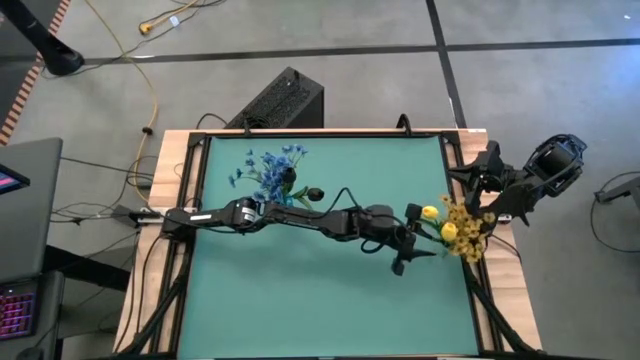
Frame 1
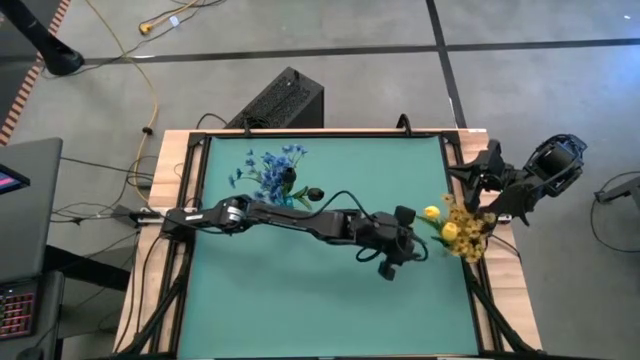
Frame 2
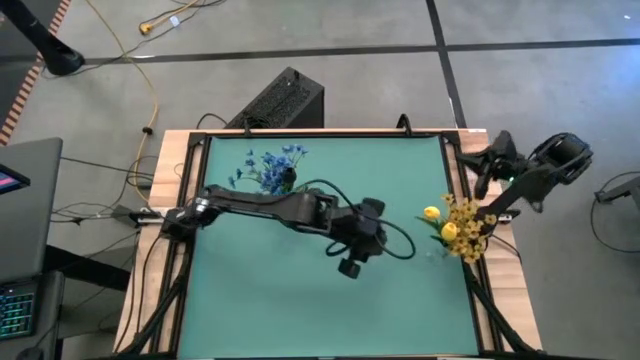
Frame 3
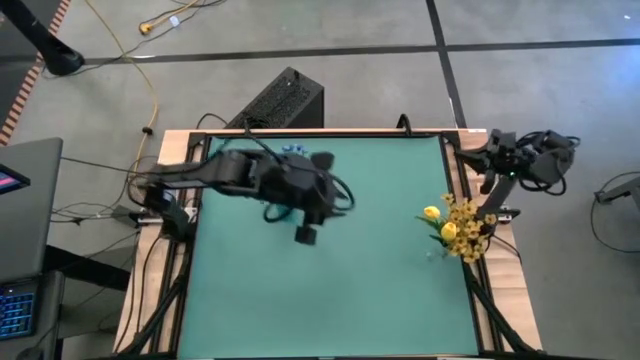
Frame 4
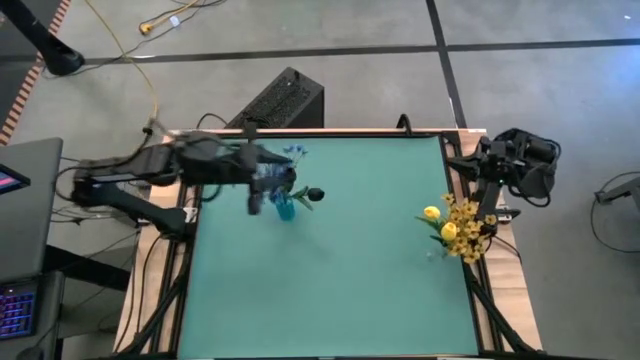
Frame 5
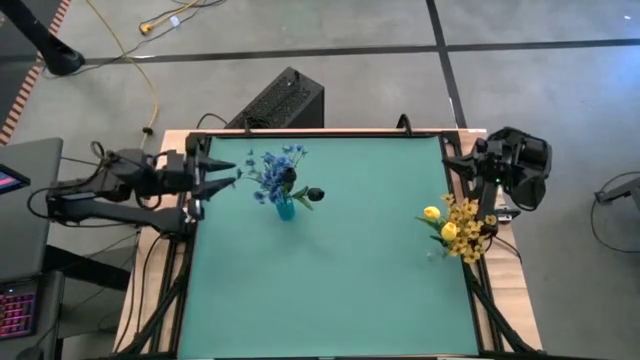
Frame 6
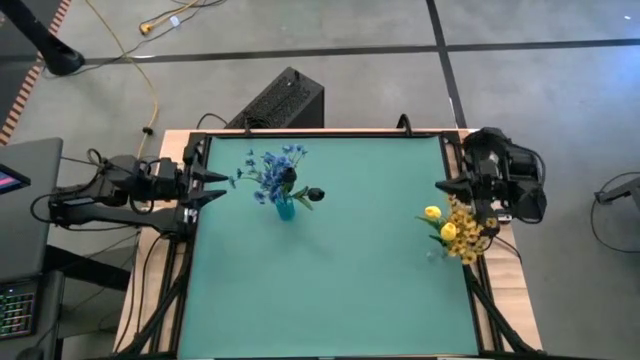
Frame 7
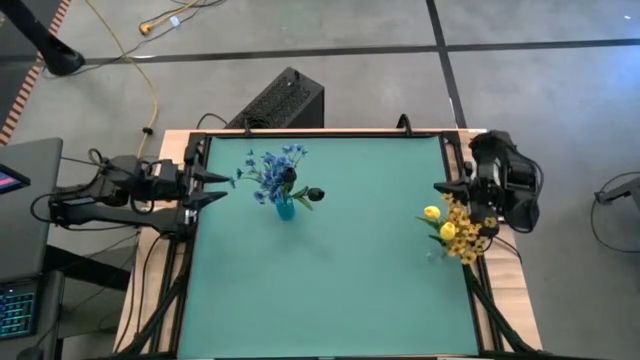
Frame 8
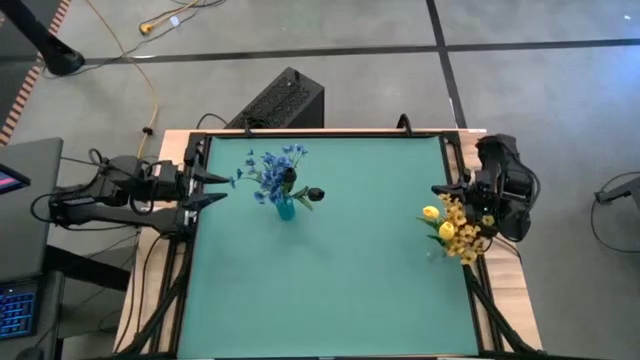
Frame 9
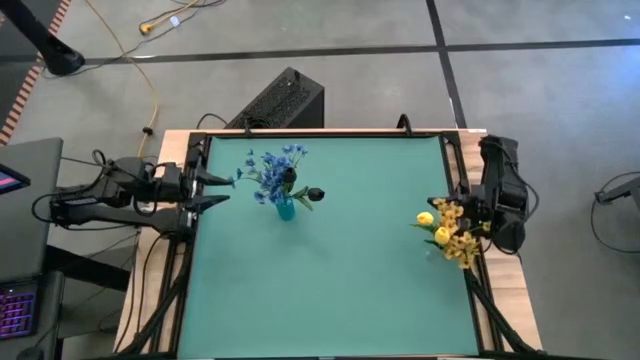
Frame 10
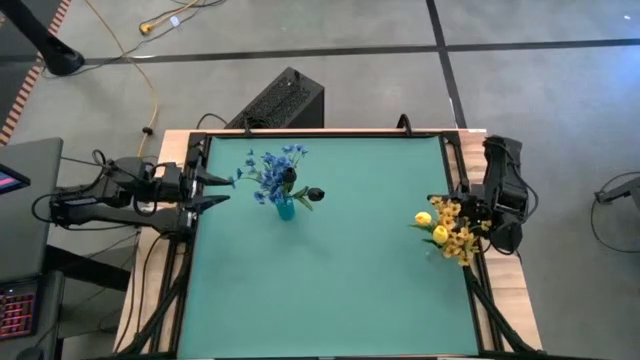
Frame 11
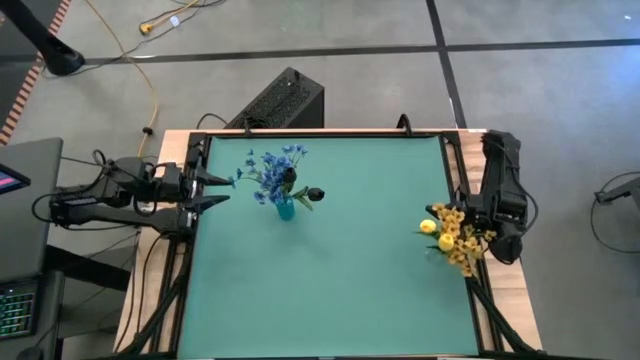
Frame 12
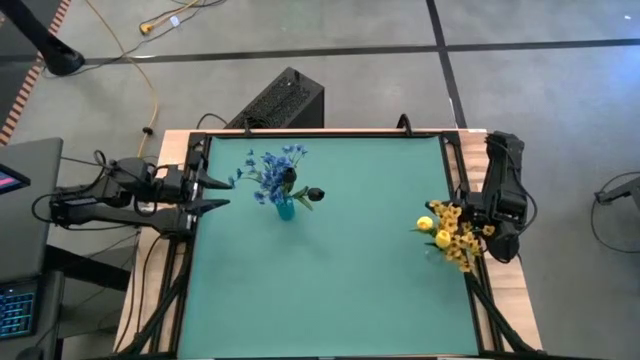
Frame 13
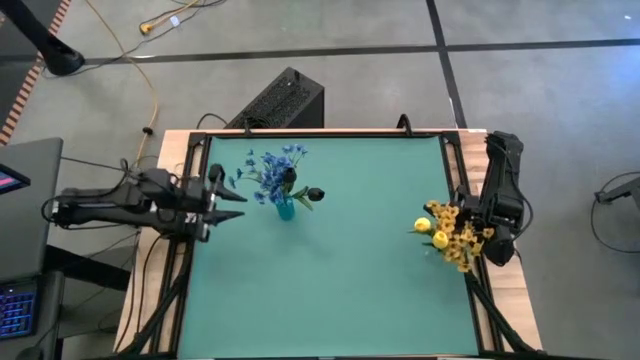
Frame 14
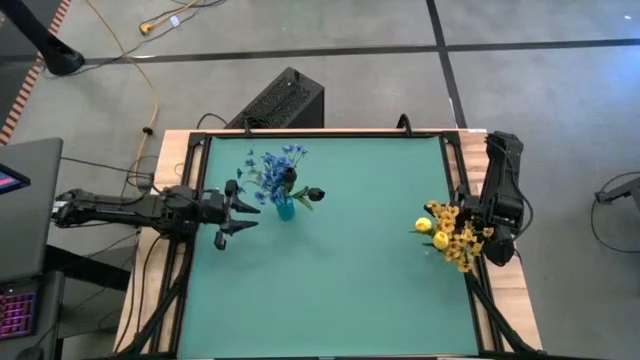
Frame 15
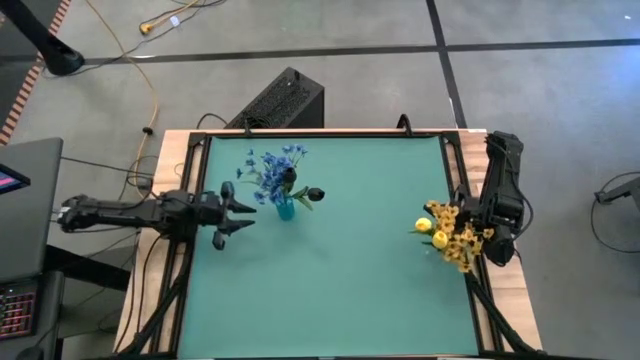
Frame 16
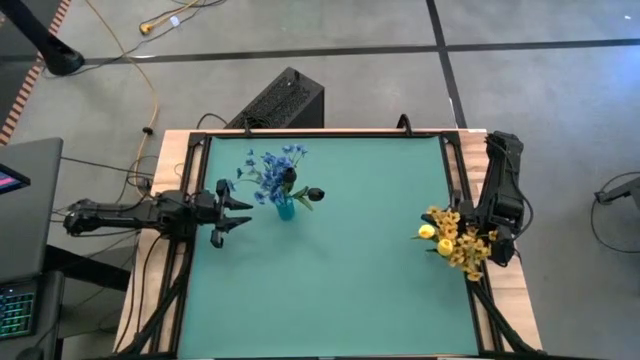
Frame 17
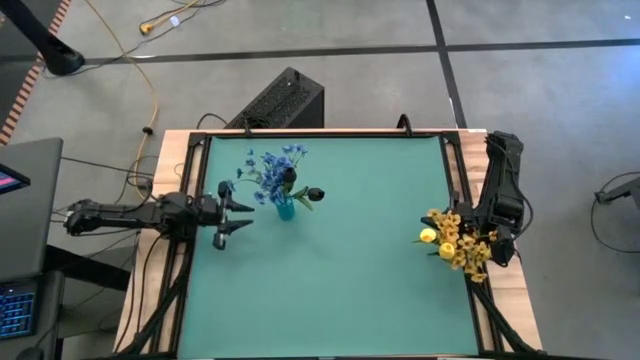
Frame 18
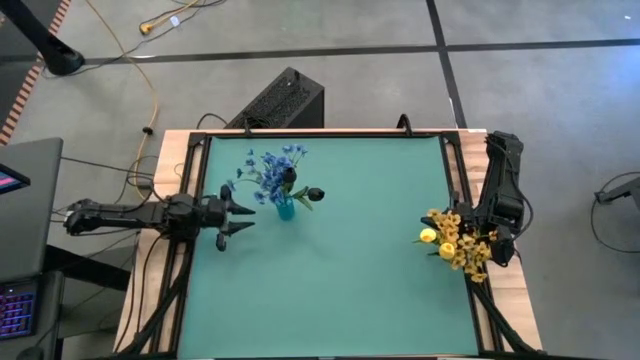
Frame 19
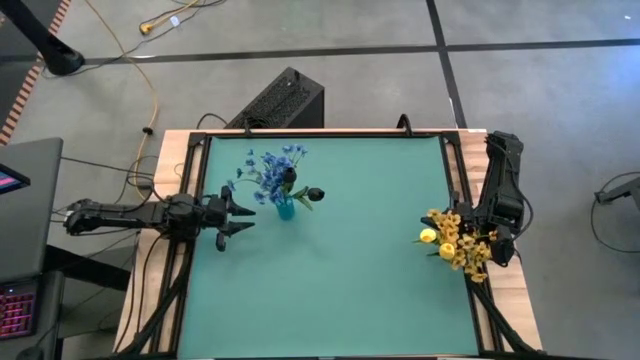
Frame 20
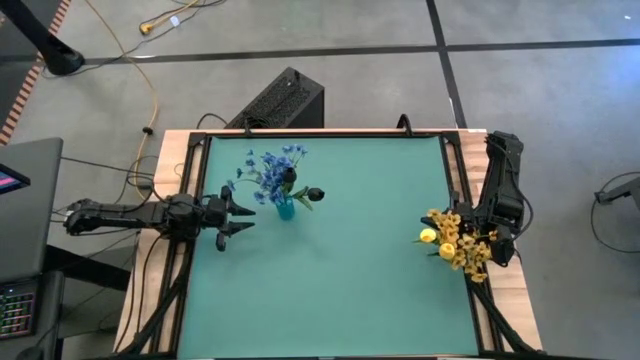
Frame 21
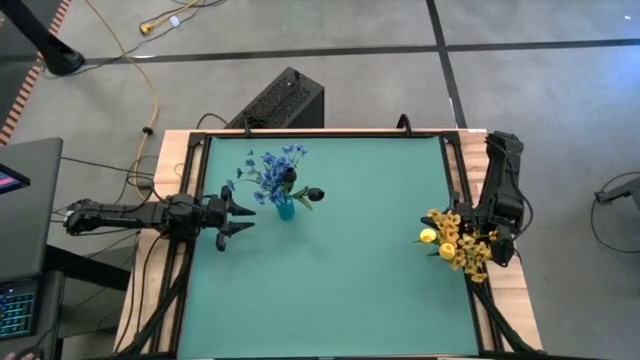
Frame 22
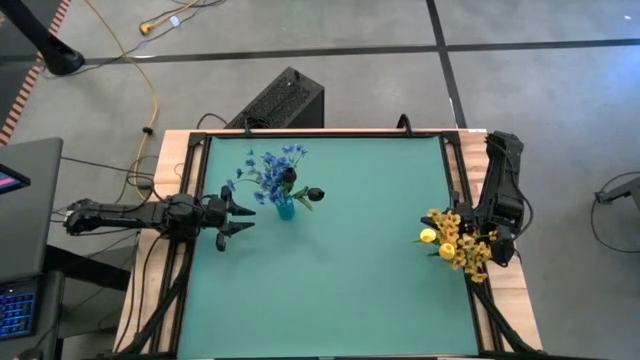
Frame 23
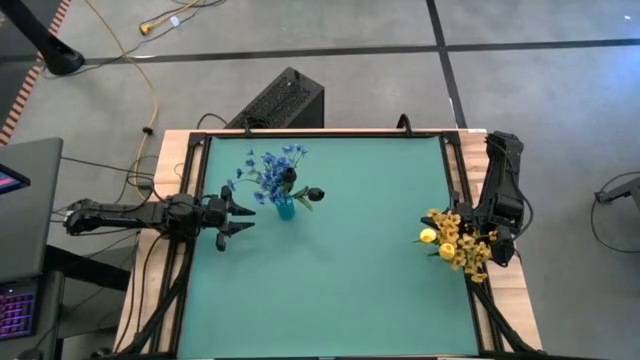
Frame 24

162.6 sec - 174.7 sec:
Task: Sort flowers into vase by color
Return to Home Position

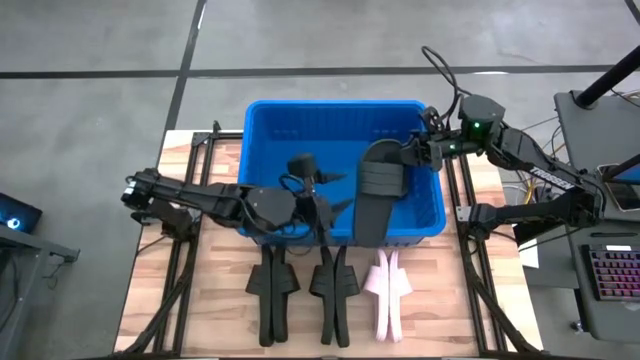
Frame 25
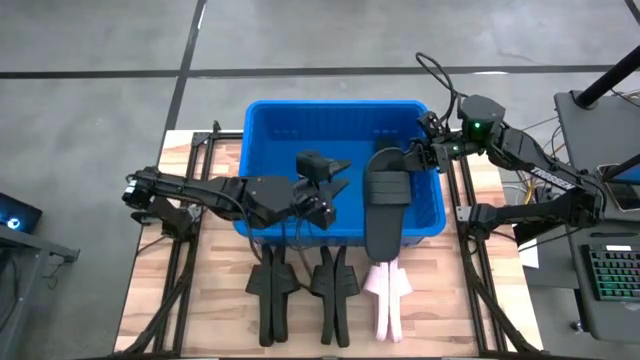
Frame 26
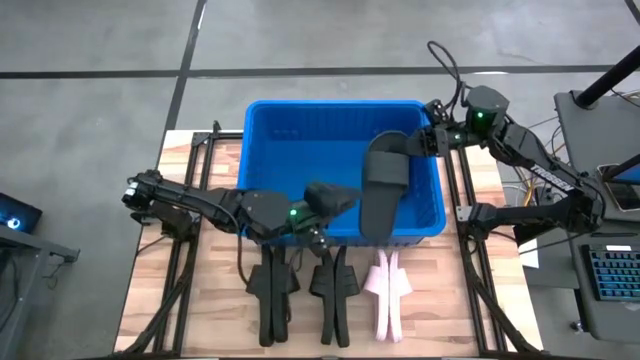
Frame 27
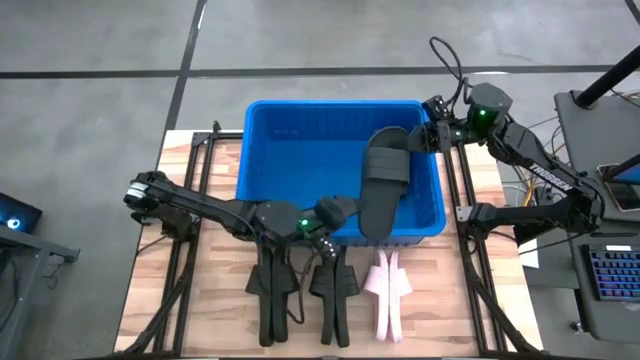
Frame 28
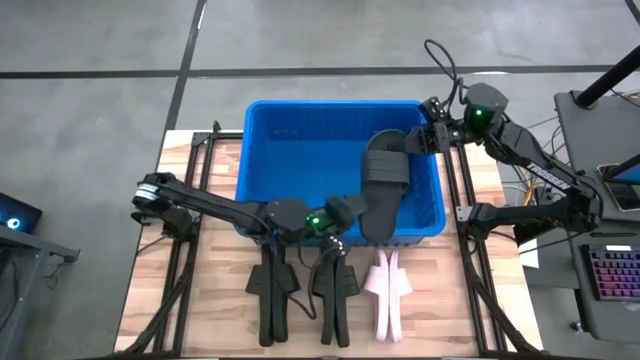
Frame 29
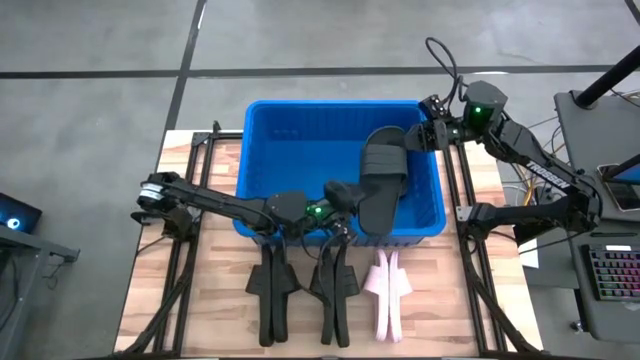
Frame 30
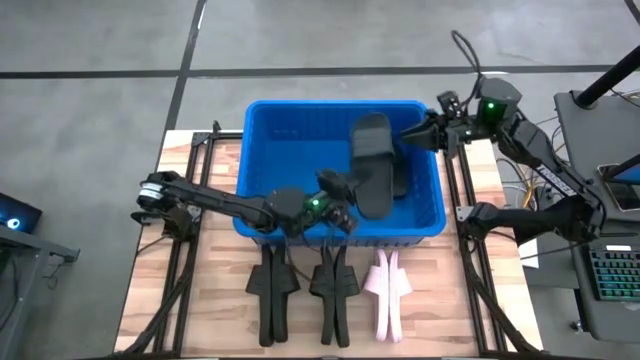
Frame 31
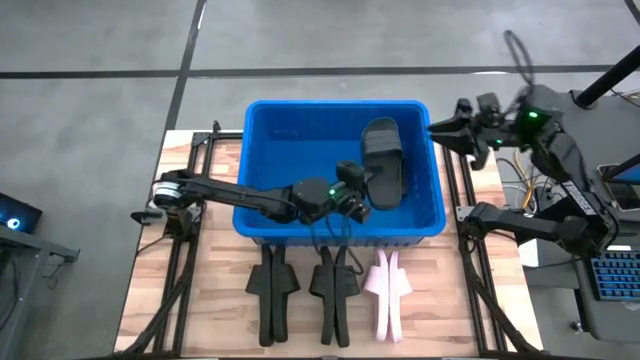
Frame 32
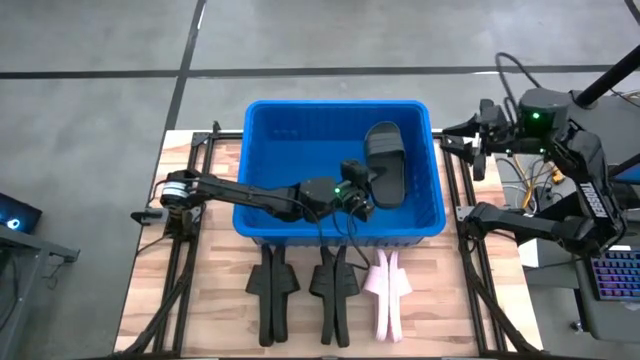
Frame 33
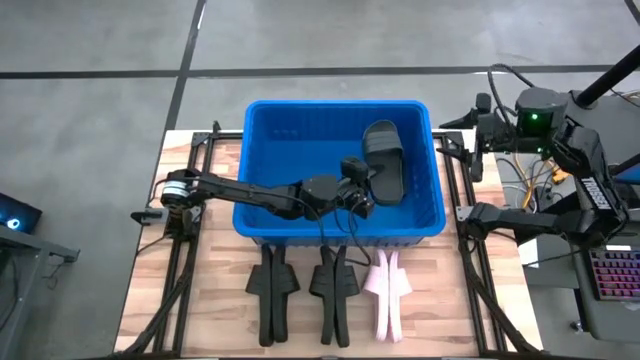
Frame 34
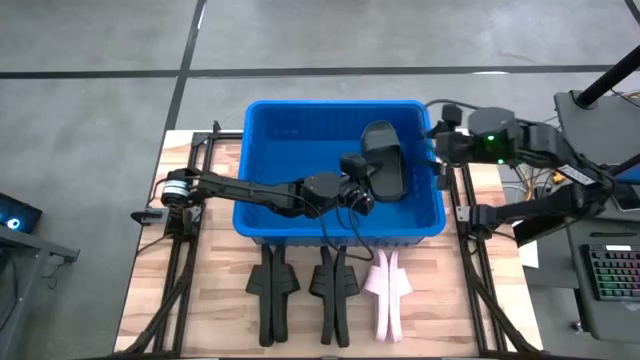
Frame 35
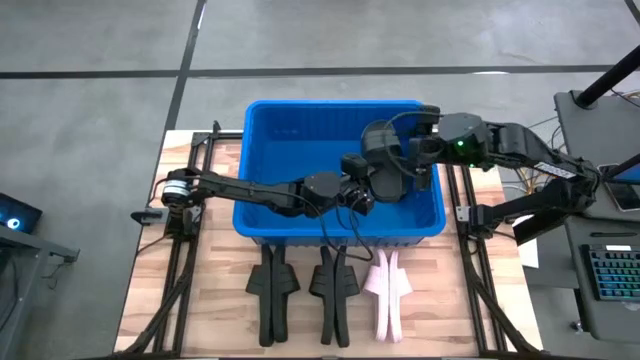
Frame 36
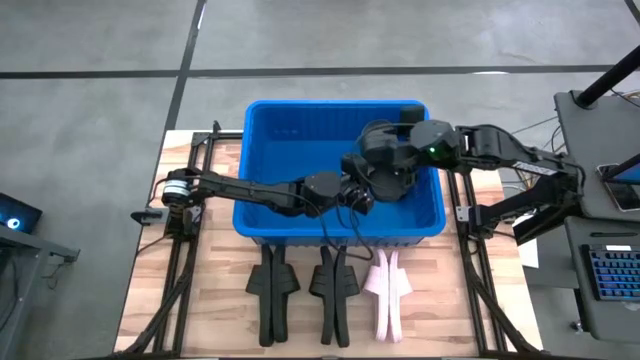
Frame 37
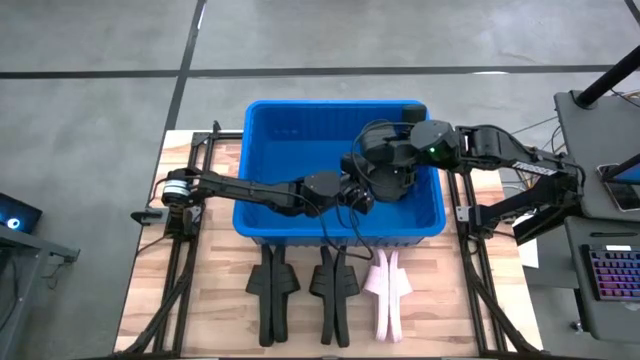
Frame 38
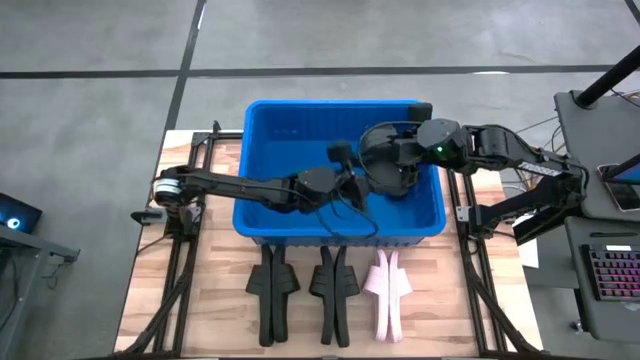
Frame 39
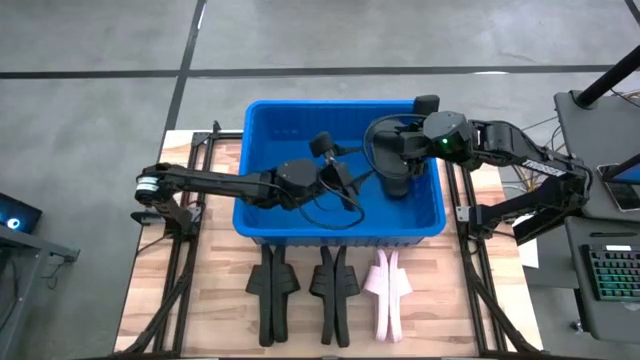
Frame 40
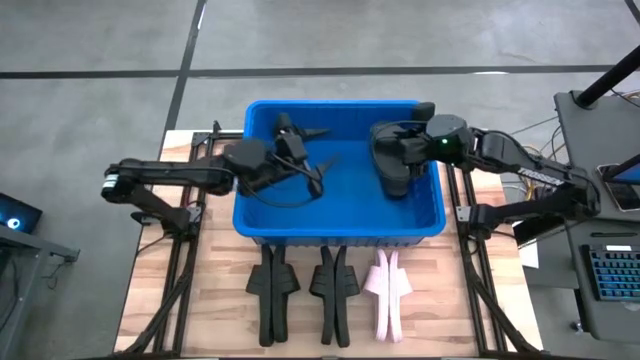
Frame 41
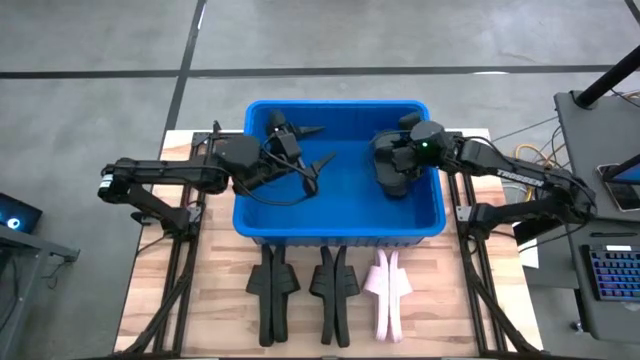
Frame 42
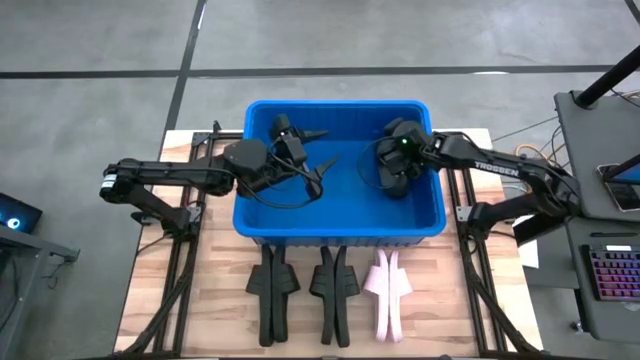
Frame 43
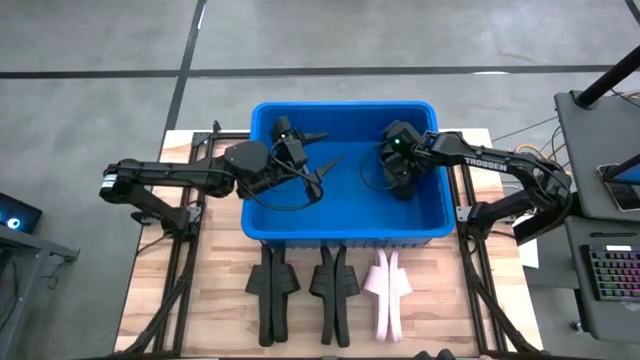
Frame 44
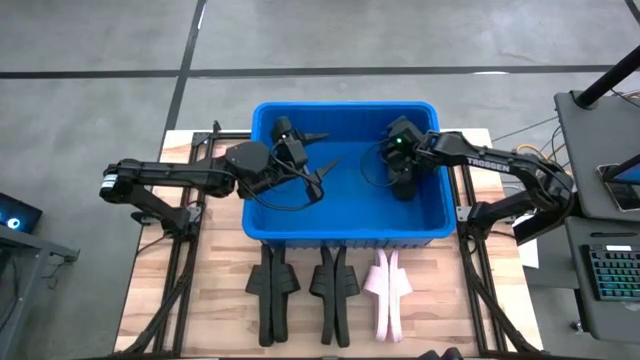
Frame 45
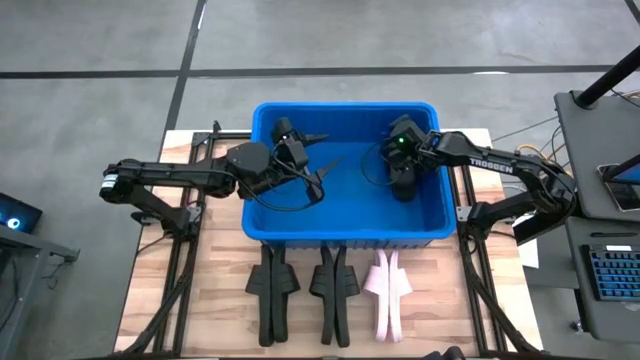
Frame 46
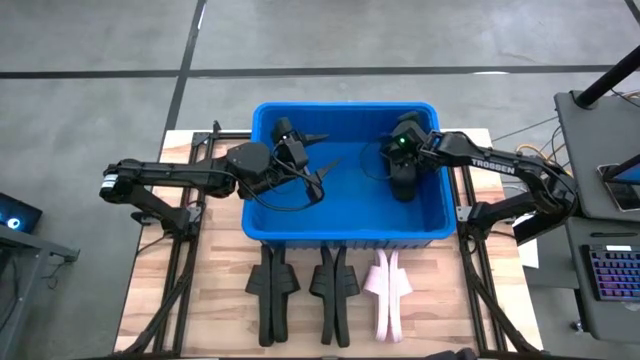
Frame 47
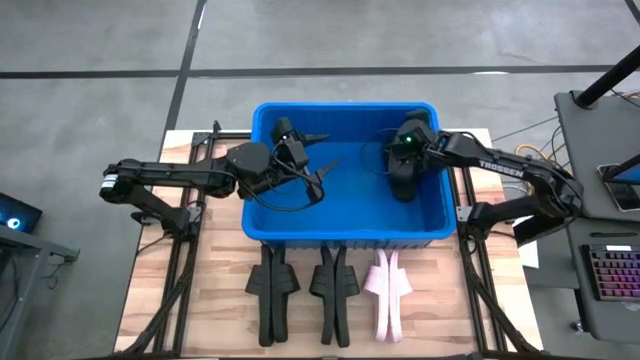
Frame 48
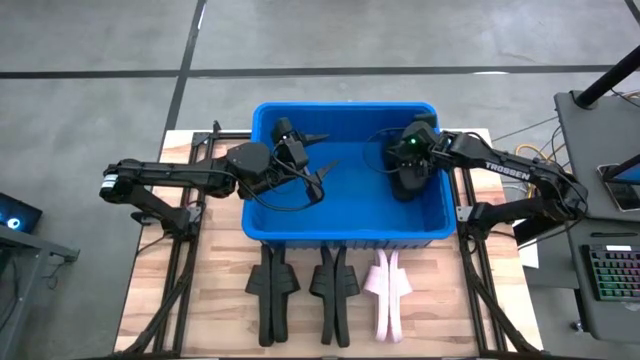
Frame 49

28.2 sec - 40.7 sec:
Task: Pick and place slides into bin
Put the black slide into the blue bin
